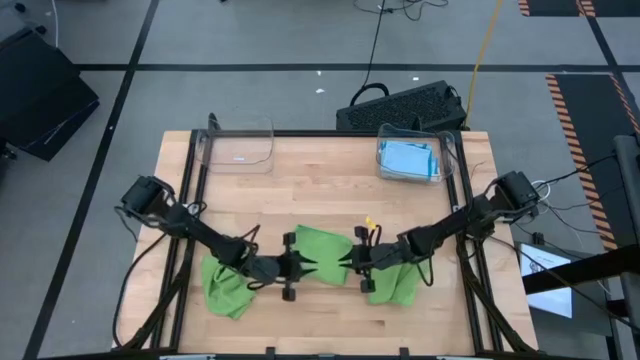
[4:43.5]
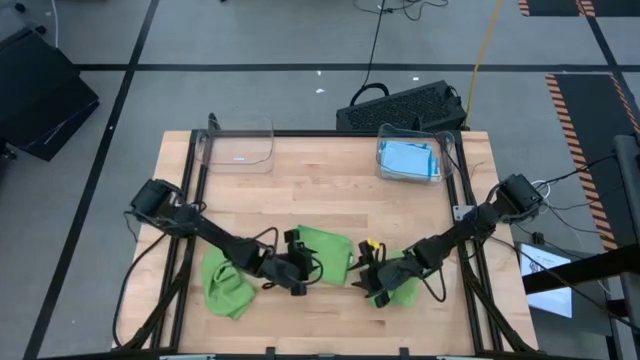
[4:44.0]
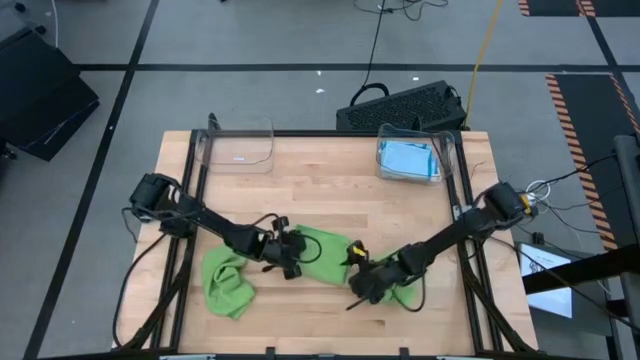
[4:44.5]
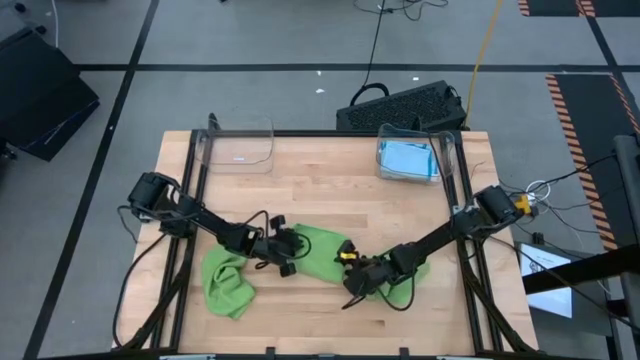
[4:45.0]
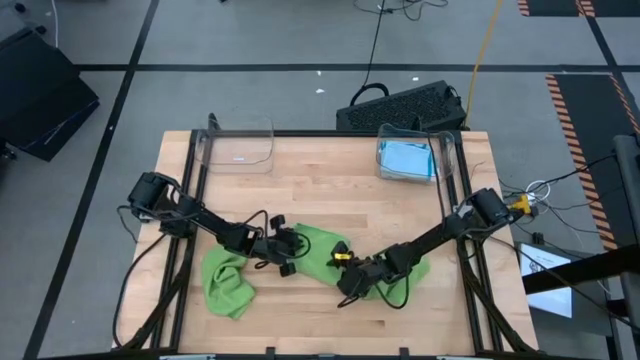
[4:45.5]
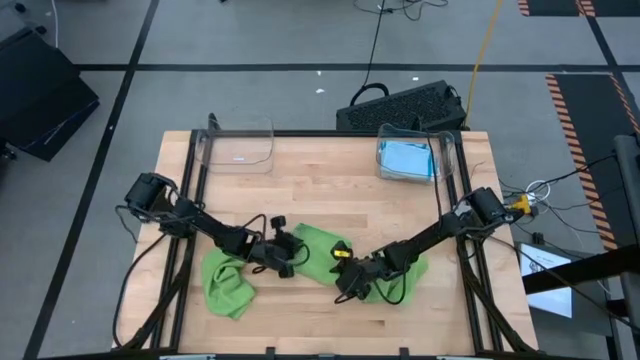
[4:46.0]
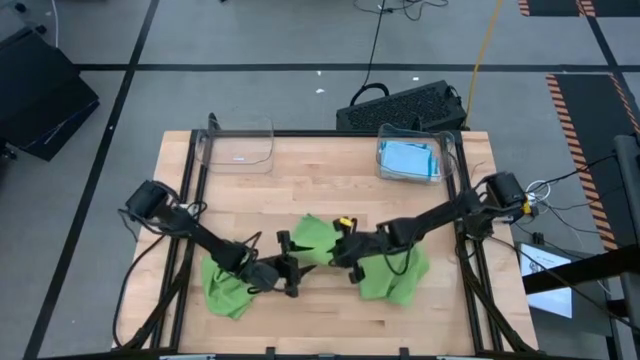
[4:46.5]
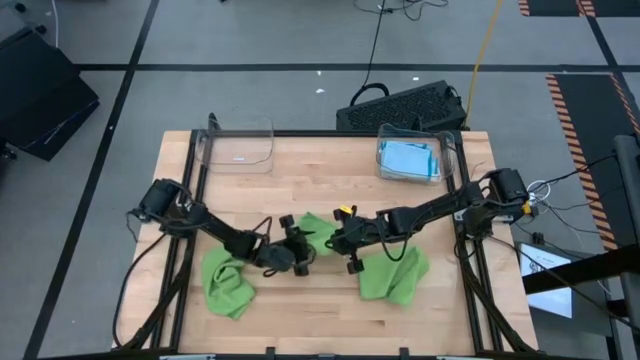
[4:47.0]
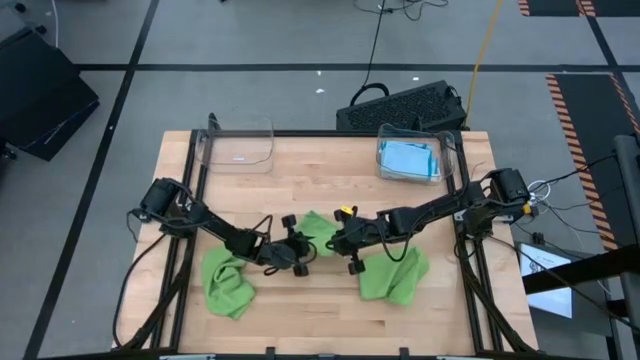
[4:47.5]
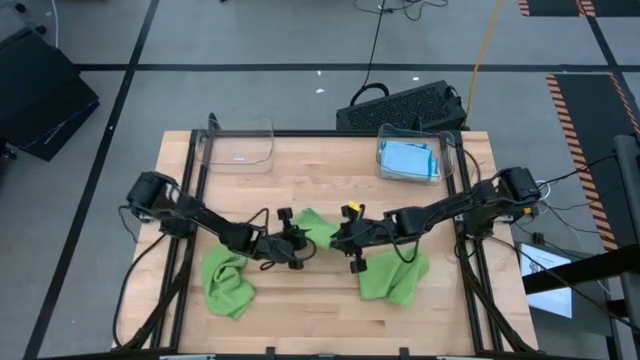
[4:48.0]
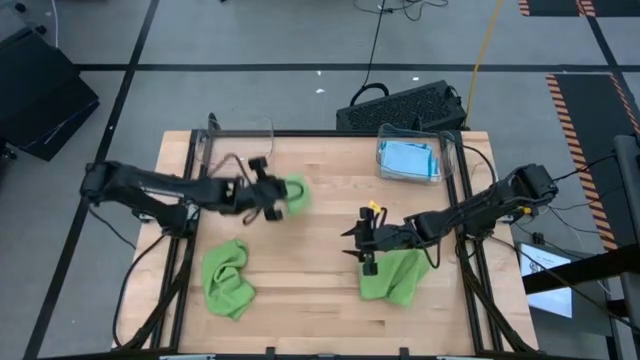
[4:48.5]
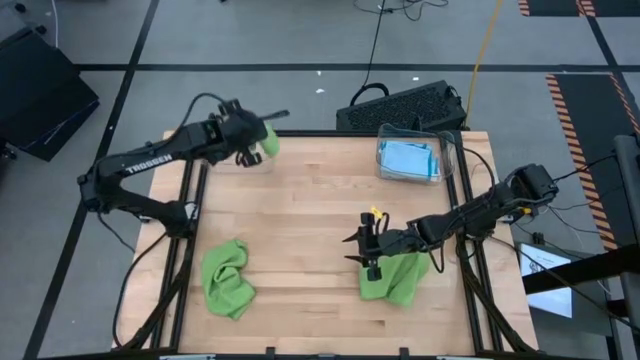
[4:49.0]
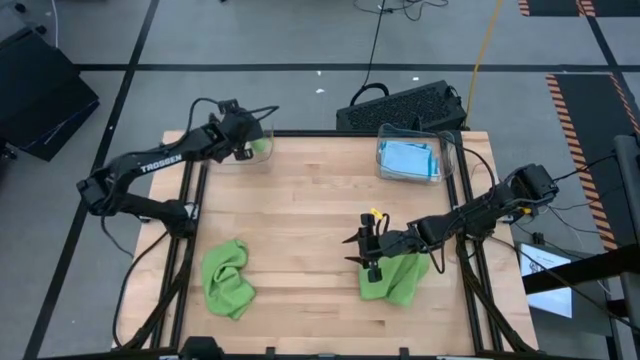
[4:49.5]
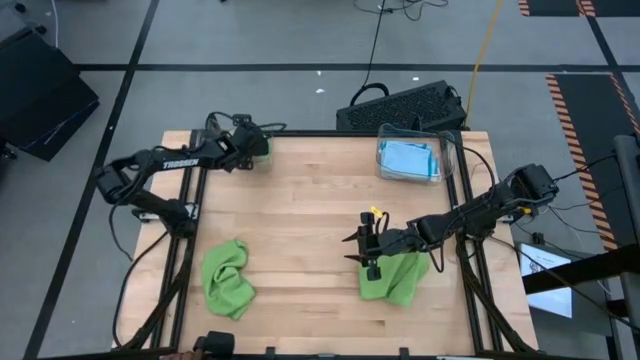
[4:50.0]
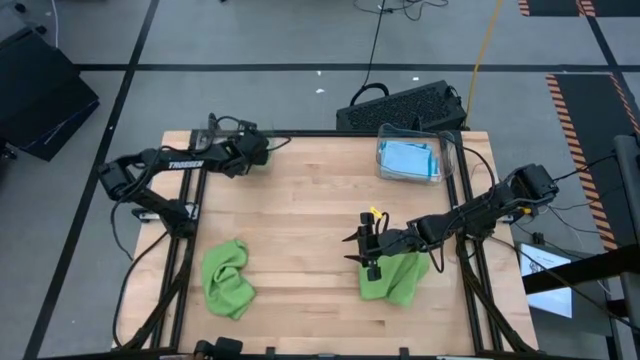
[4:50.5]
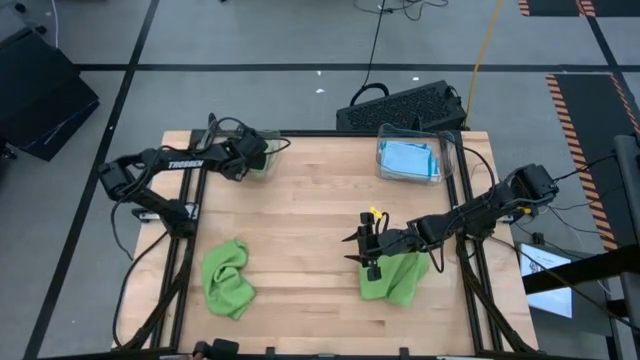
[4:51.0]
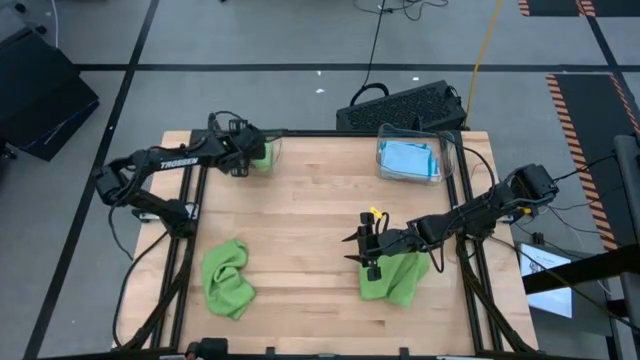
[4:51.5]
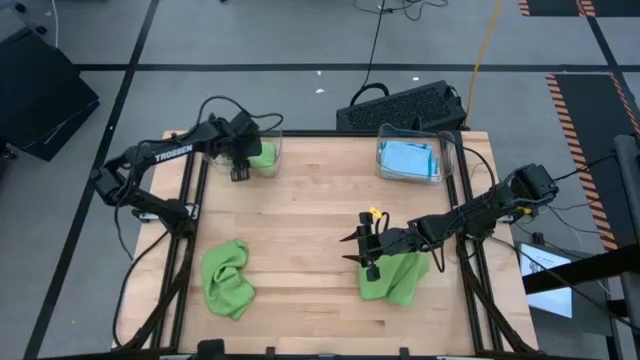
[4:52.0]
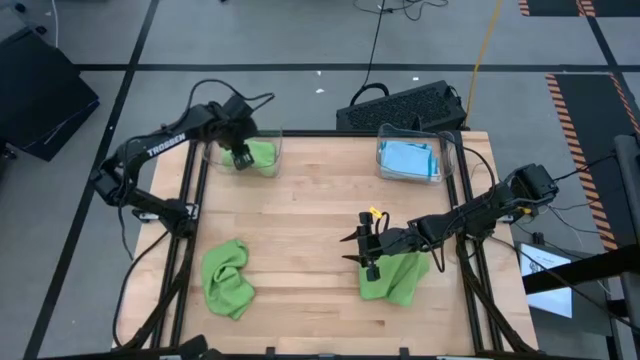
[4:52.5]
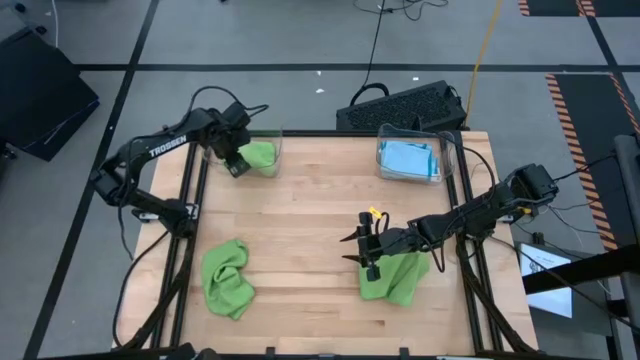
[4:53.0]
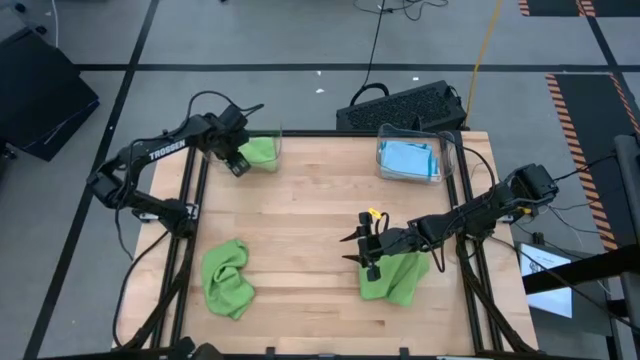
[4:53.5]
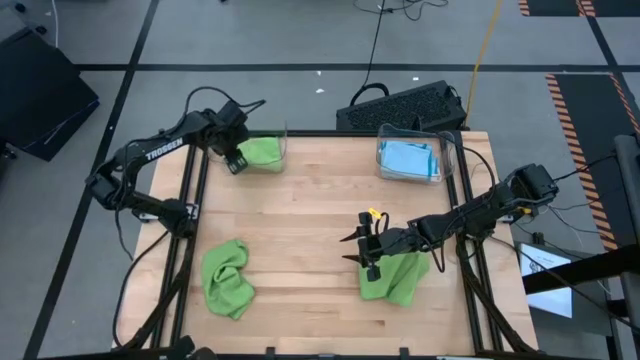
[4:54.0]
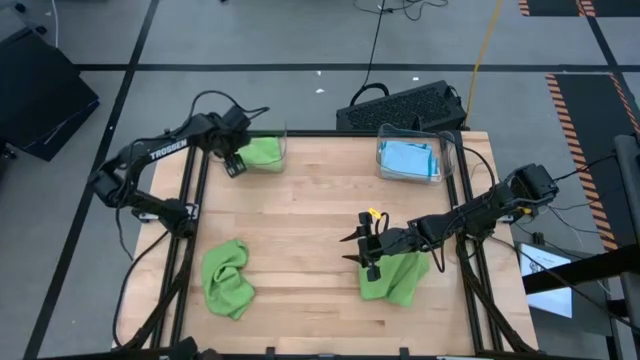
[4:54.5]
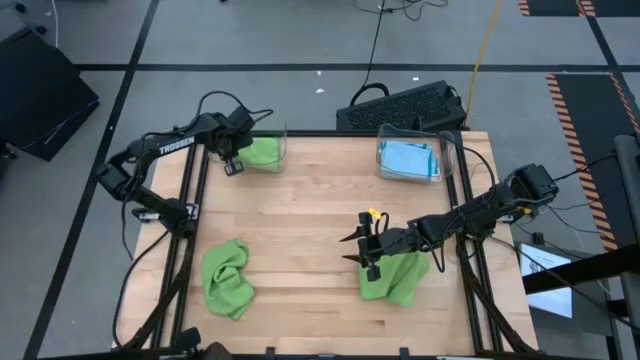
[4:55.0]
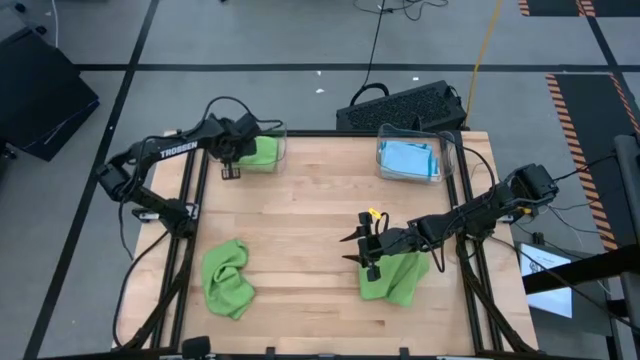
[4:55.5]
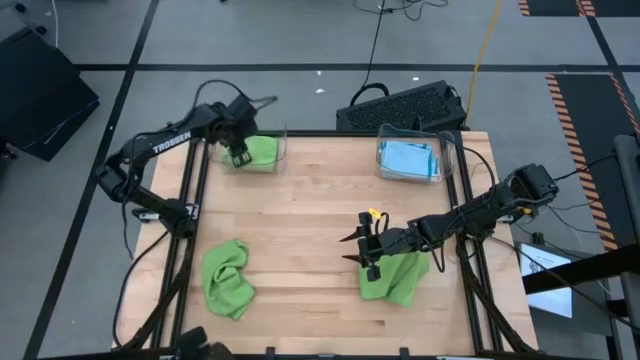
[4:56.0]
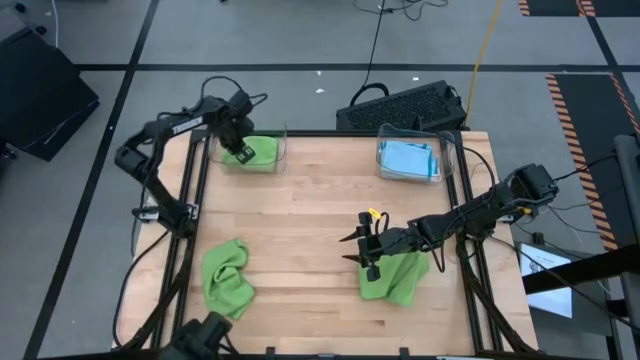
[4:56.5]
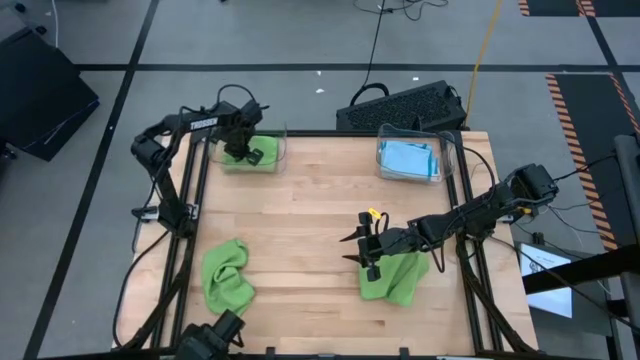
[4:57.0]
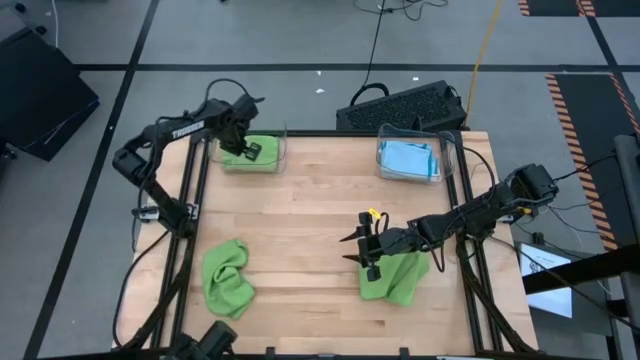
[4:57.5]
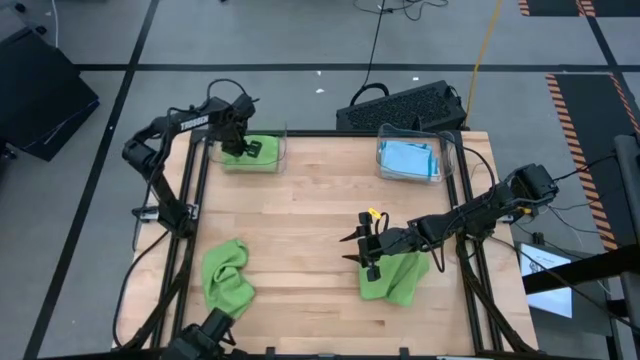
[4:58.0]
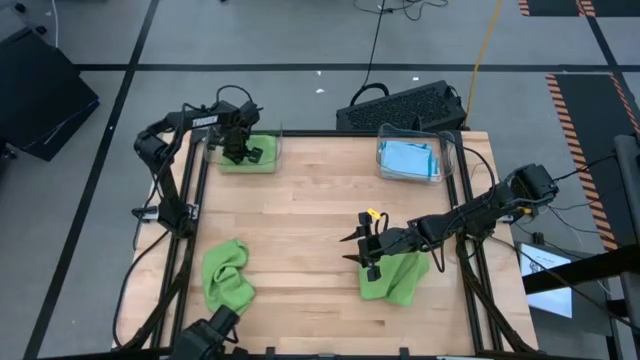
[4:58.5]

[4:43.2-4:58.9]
Task: Fold microfiber towels
Put the folded green microfiber cloth into the left transparent bin

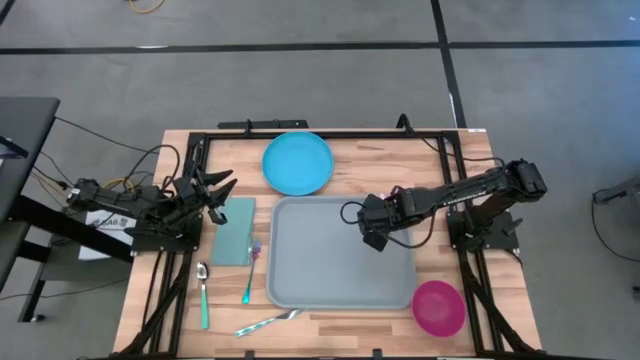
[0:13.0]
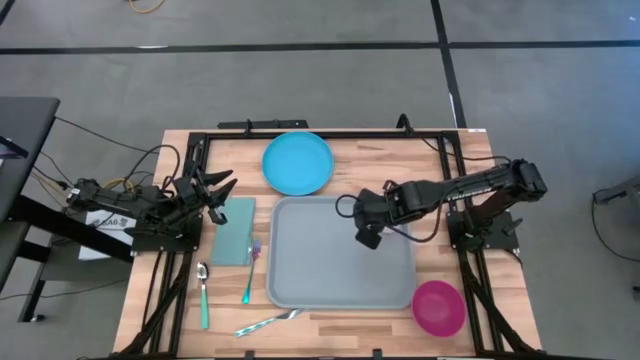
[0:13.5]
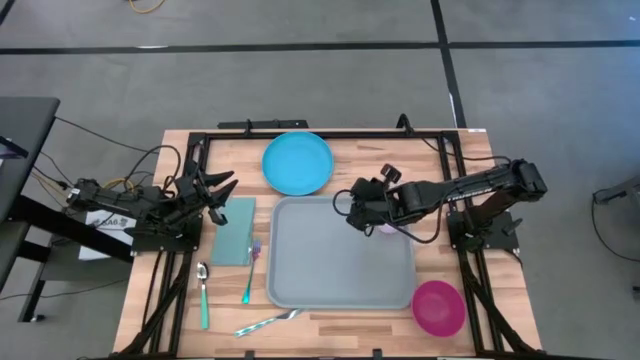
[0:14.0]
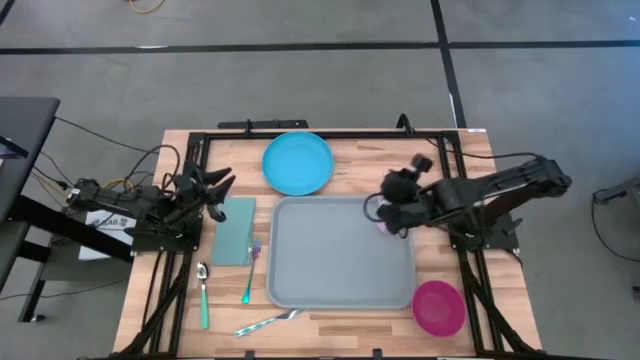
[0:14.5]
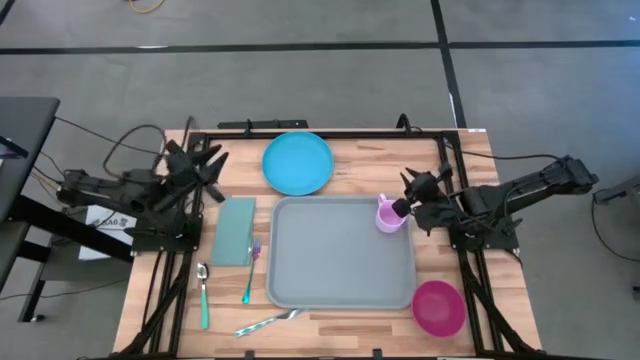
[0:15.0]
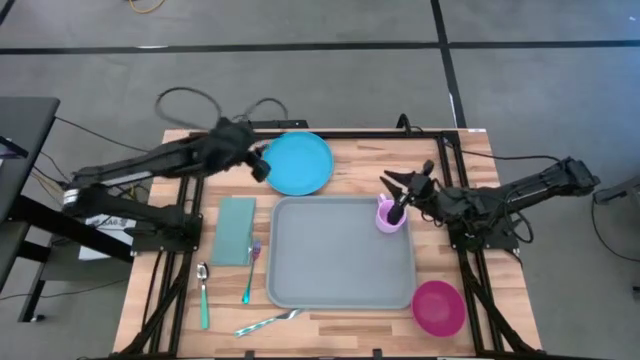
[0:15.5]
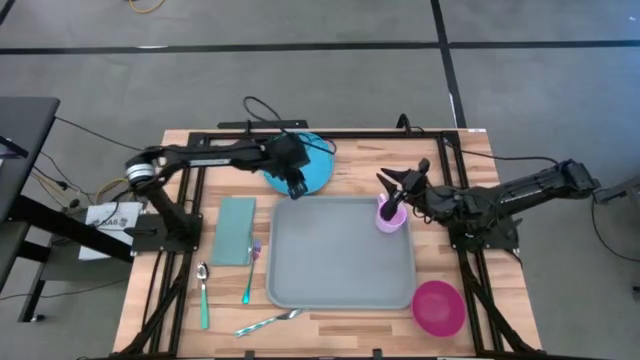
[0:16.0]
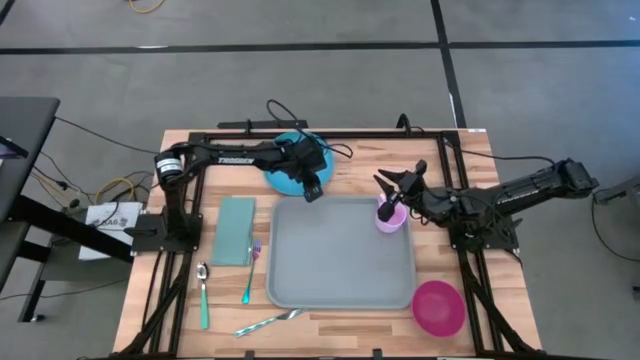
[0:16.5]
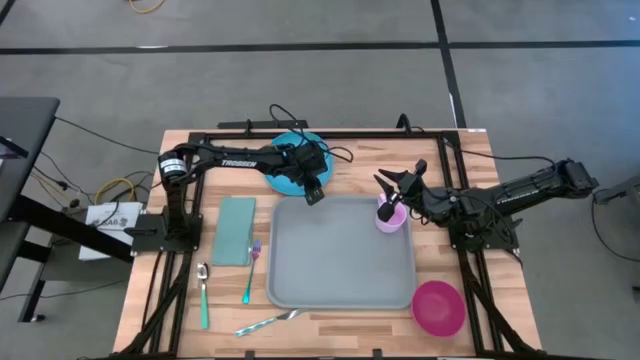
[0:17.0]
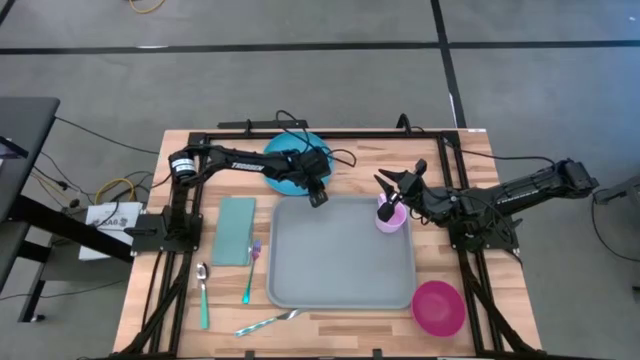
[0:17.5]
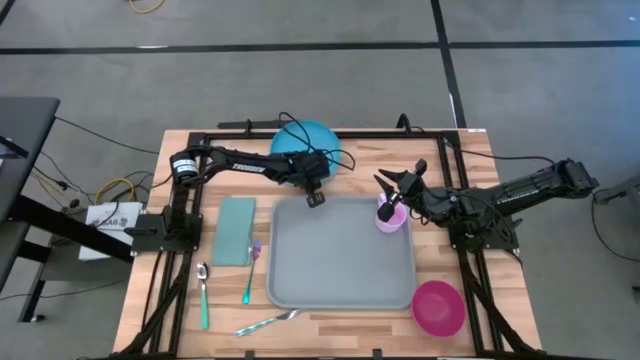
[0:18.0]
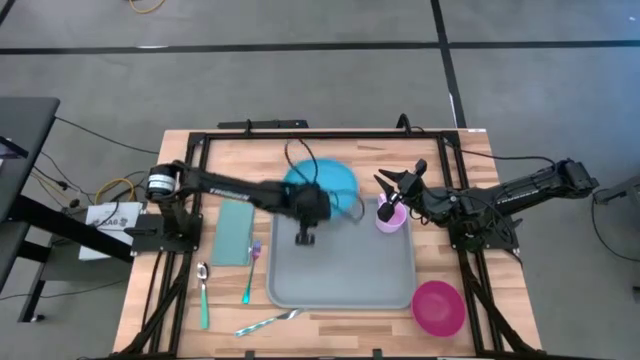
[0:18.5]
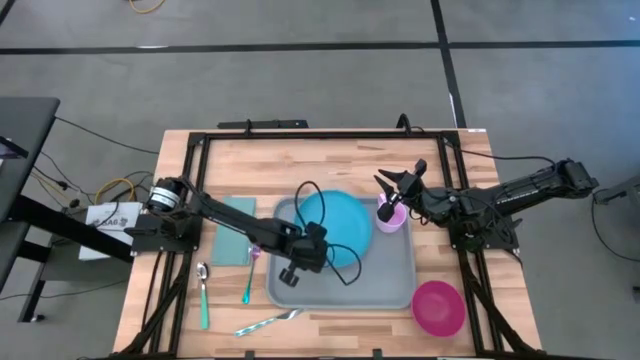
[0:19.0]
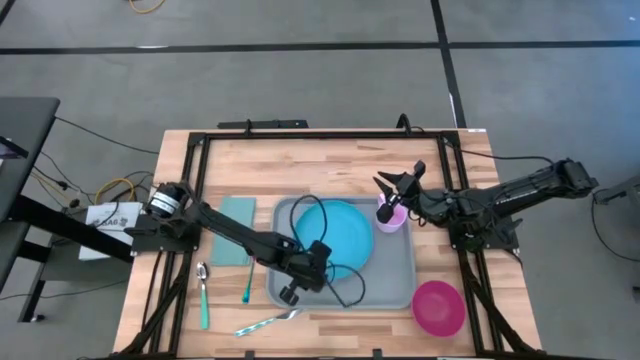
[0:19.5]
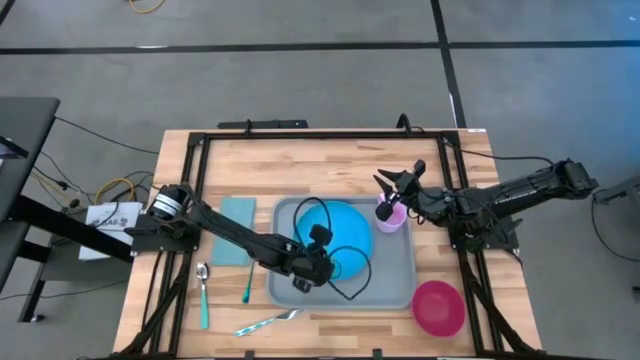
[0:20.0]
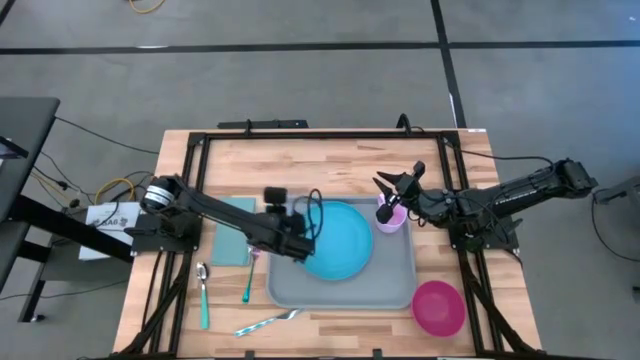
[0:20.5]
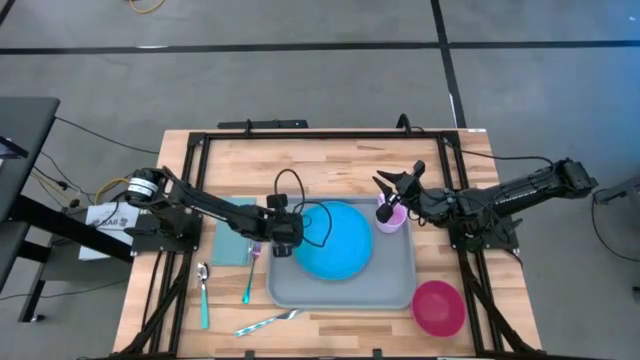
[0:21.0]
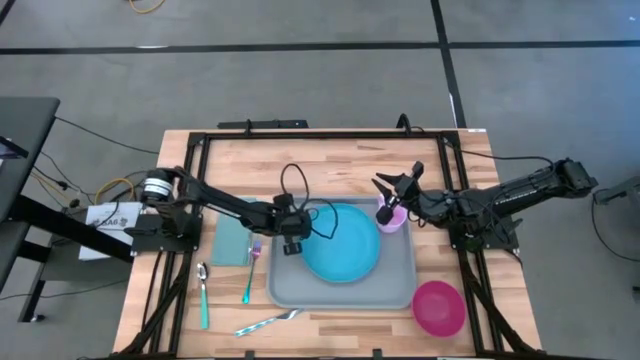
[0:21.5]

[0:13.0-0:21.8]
Task: Set up tray
Put the blue plate on the gray serving tray under the pink mug
